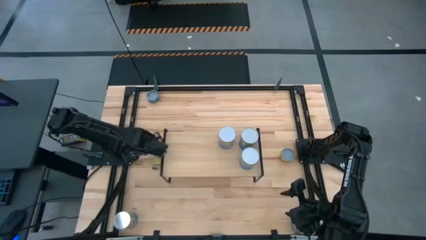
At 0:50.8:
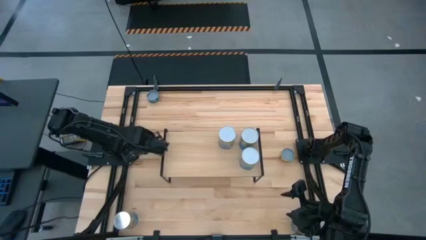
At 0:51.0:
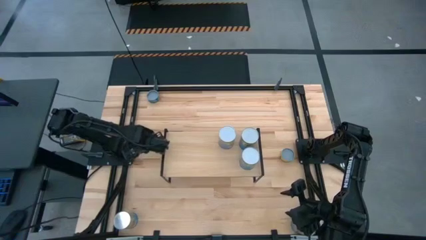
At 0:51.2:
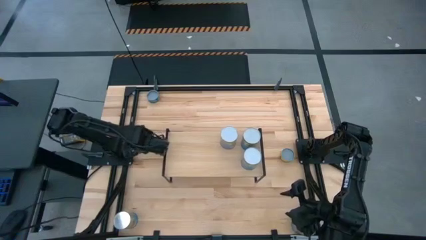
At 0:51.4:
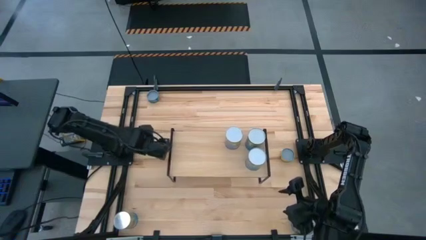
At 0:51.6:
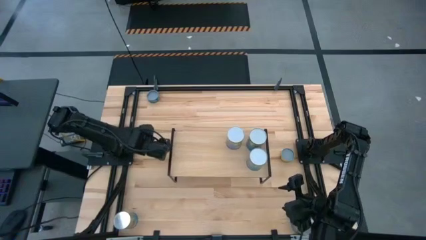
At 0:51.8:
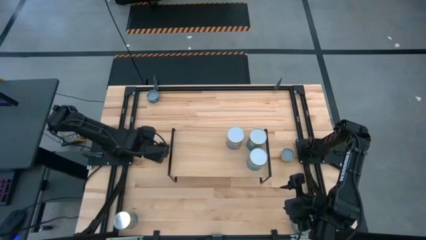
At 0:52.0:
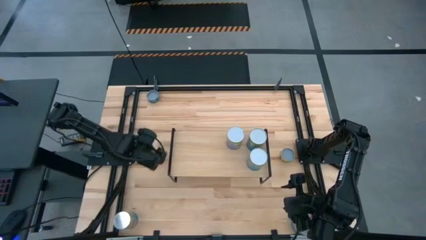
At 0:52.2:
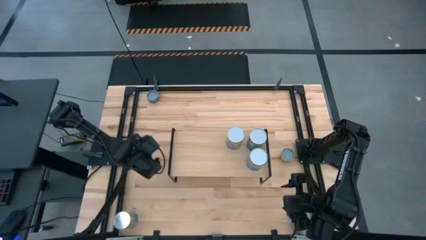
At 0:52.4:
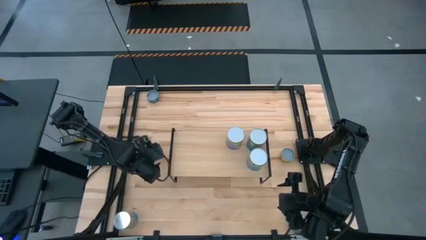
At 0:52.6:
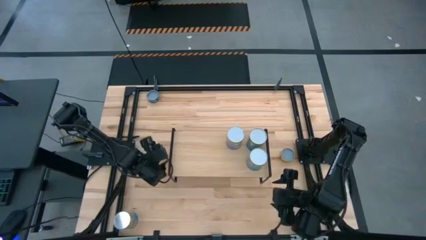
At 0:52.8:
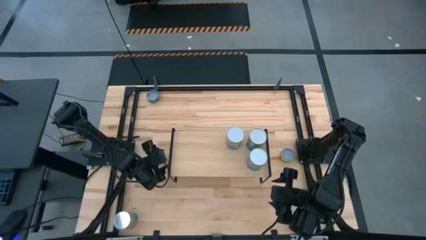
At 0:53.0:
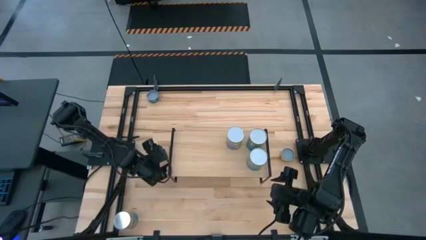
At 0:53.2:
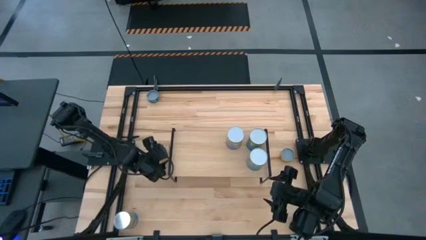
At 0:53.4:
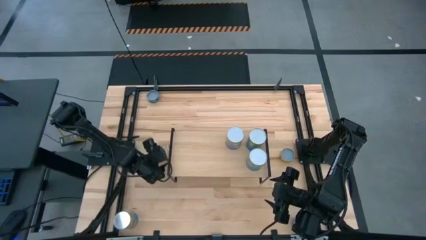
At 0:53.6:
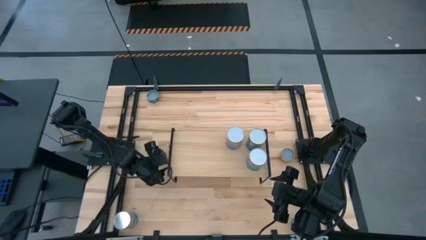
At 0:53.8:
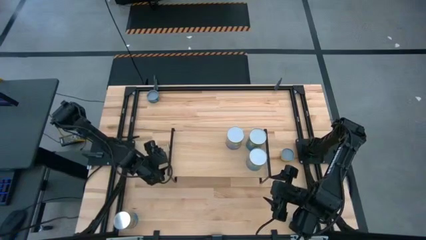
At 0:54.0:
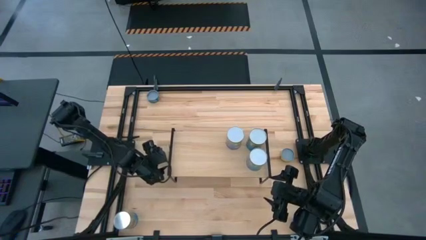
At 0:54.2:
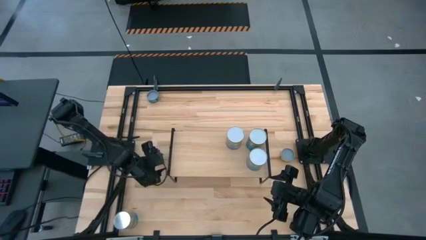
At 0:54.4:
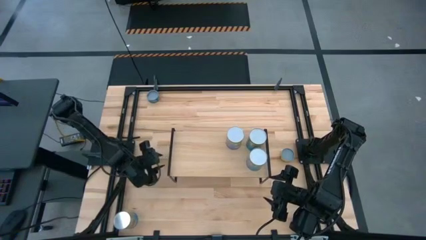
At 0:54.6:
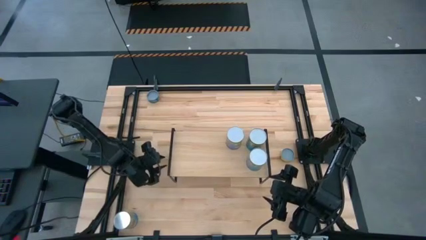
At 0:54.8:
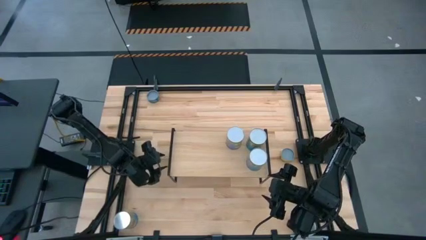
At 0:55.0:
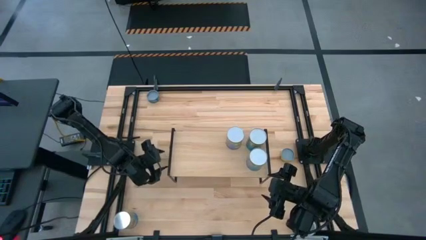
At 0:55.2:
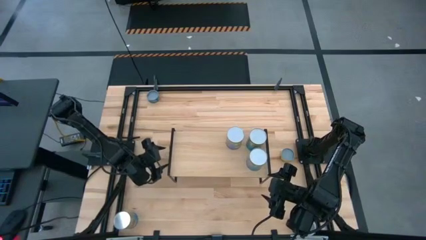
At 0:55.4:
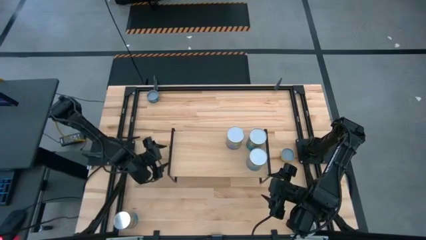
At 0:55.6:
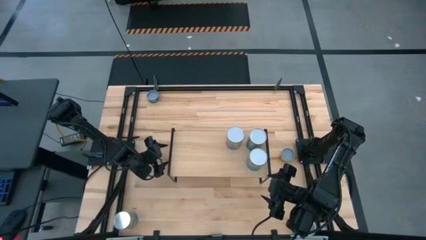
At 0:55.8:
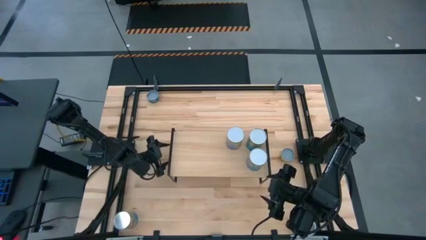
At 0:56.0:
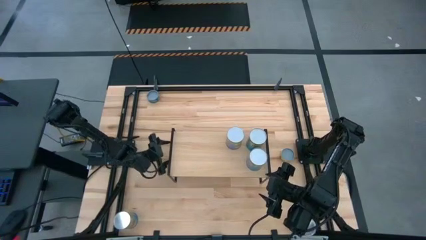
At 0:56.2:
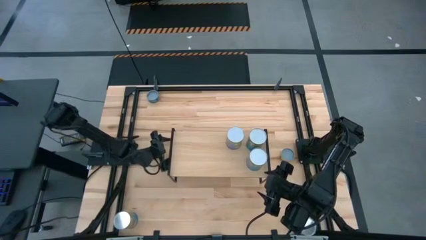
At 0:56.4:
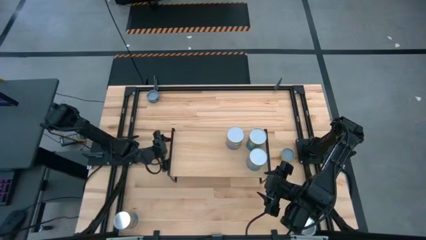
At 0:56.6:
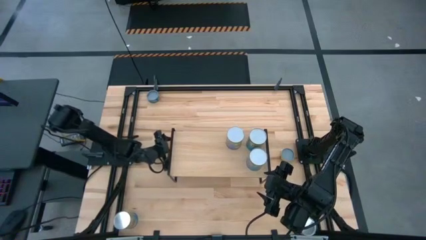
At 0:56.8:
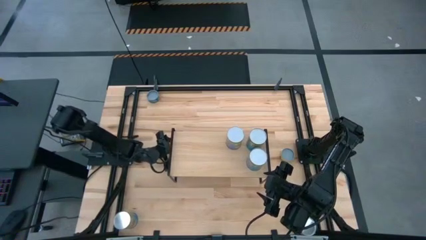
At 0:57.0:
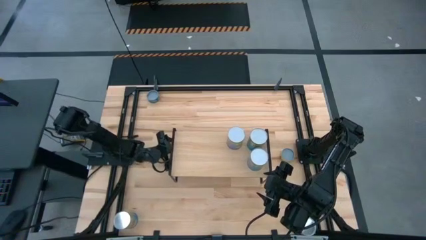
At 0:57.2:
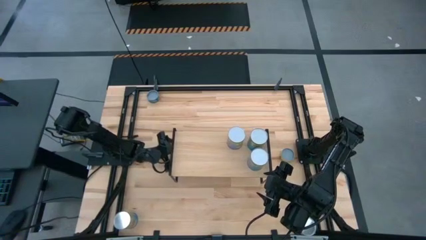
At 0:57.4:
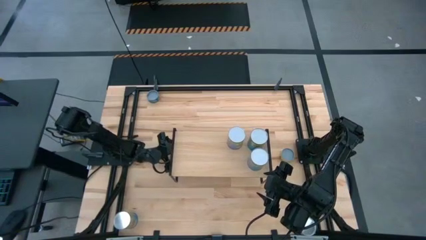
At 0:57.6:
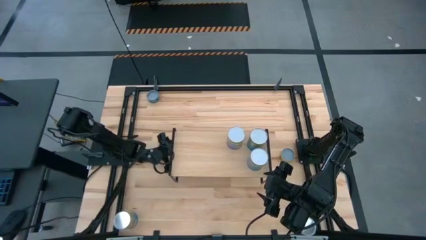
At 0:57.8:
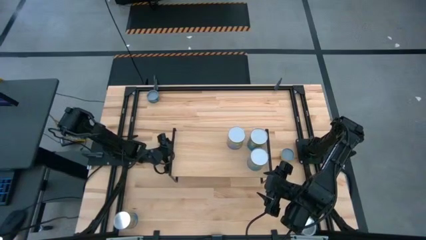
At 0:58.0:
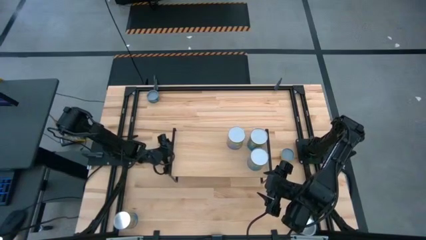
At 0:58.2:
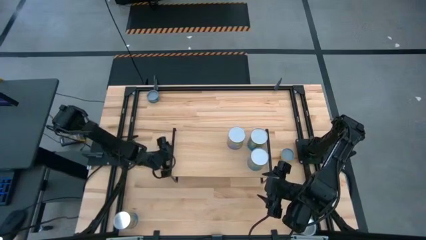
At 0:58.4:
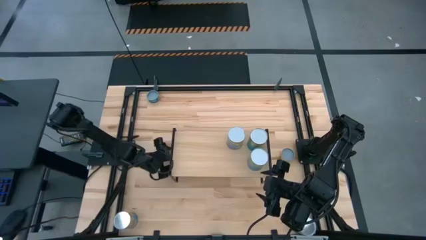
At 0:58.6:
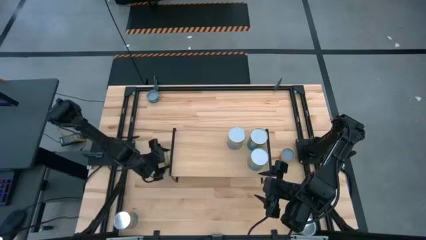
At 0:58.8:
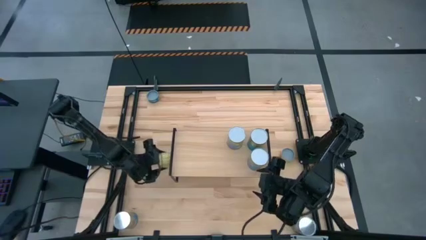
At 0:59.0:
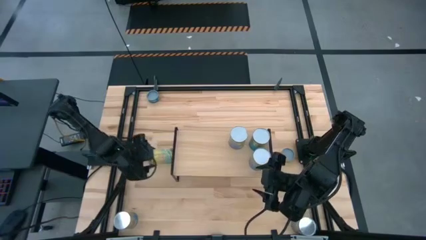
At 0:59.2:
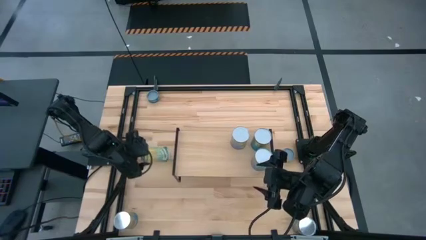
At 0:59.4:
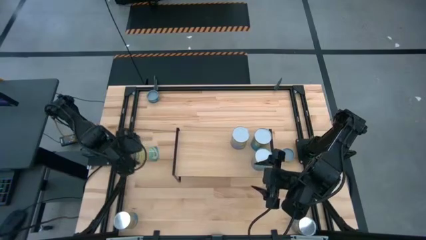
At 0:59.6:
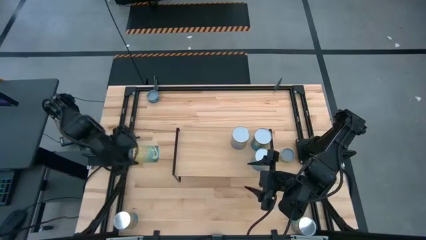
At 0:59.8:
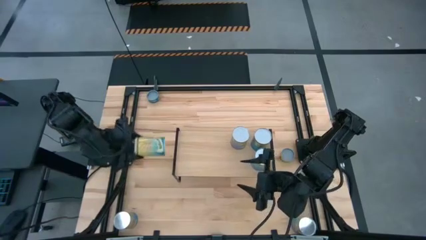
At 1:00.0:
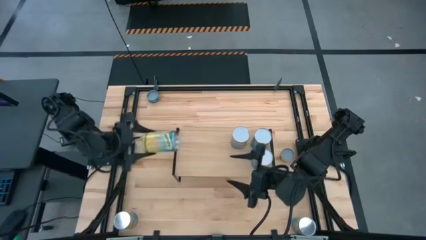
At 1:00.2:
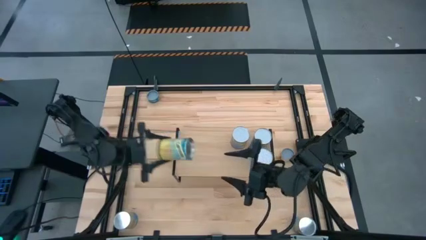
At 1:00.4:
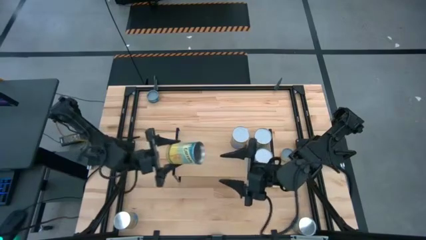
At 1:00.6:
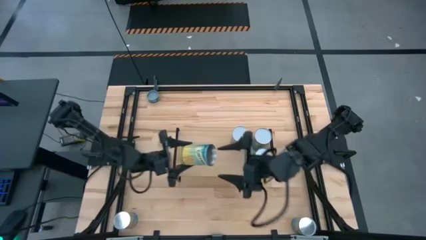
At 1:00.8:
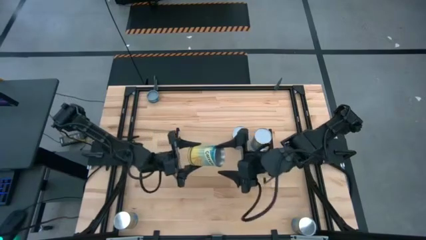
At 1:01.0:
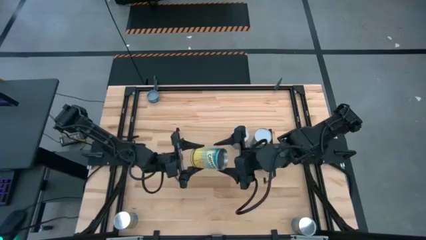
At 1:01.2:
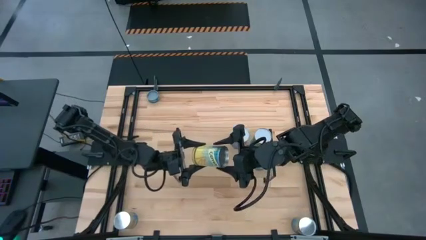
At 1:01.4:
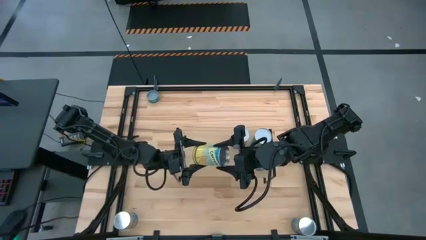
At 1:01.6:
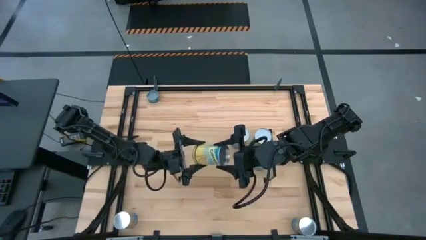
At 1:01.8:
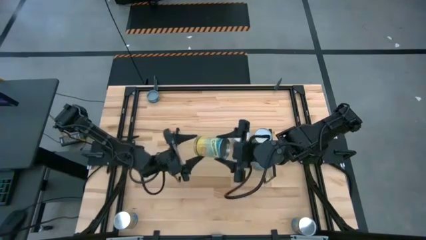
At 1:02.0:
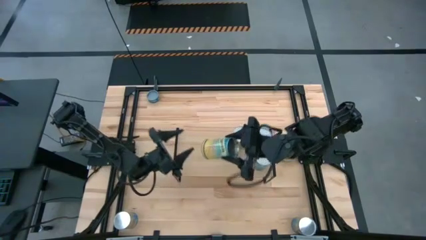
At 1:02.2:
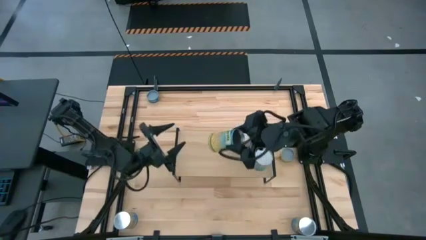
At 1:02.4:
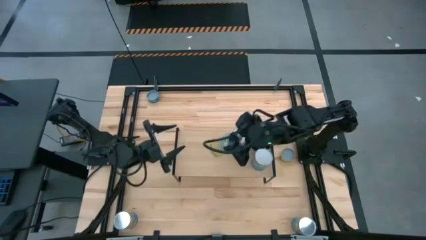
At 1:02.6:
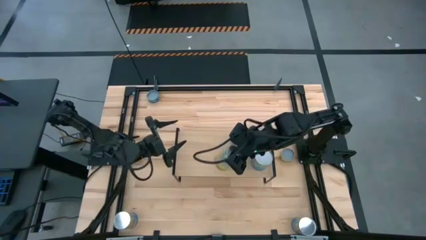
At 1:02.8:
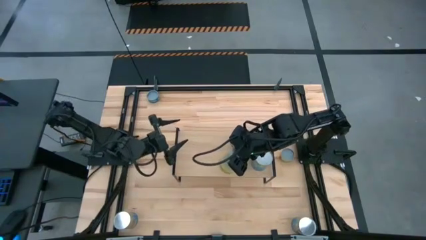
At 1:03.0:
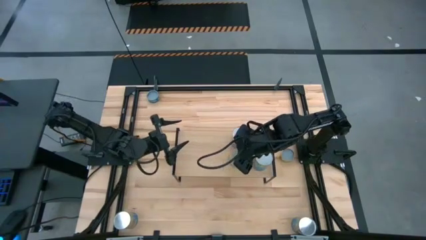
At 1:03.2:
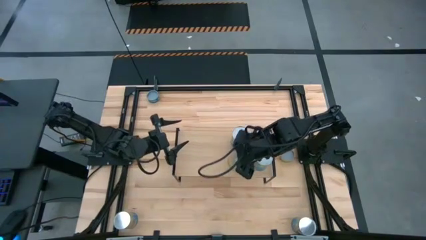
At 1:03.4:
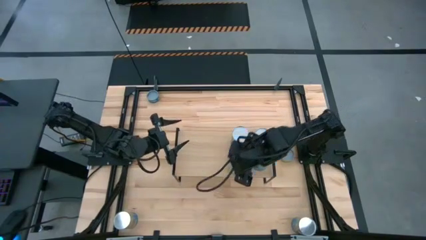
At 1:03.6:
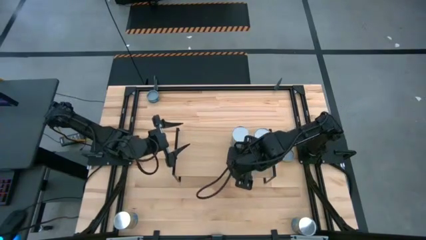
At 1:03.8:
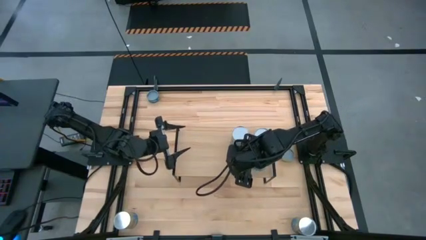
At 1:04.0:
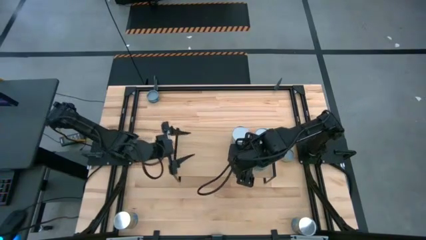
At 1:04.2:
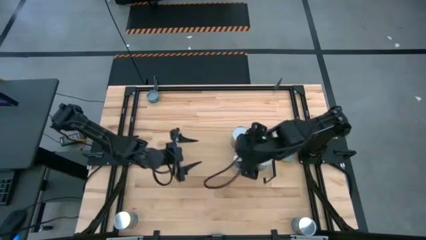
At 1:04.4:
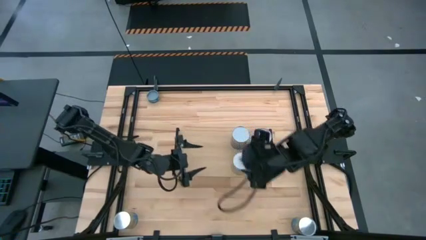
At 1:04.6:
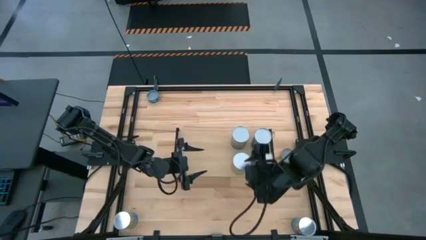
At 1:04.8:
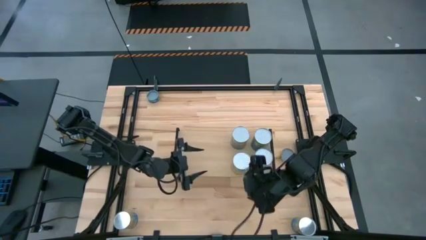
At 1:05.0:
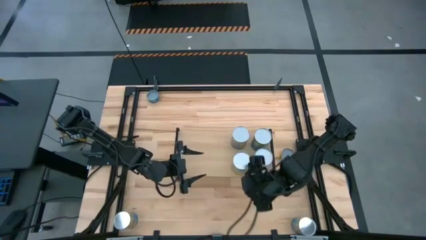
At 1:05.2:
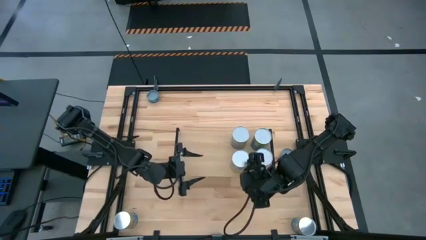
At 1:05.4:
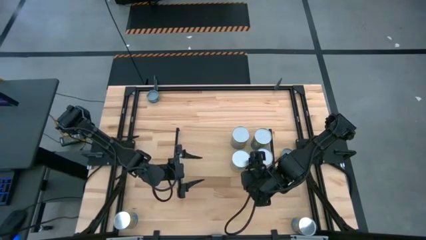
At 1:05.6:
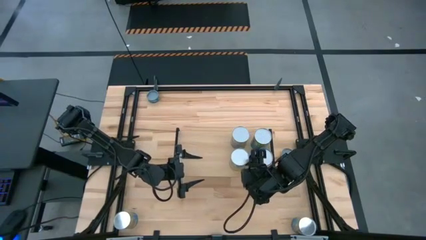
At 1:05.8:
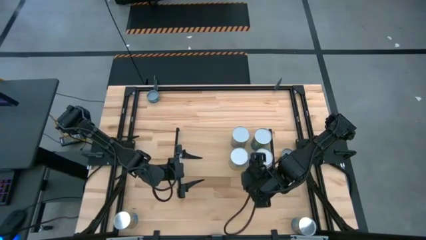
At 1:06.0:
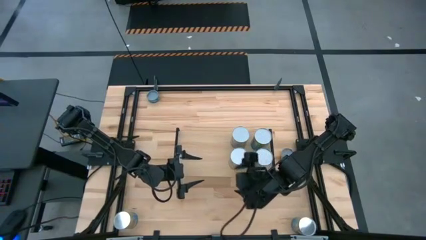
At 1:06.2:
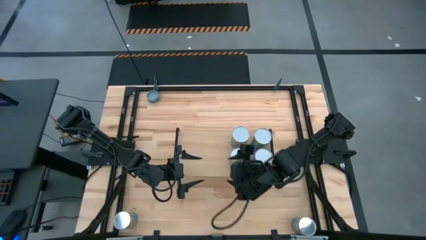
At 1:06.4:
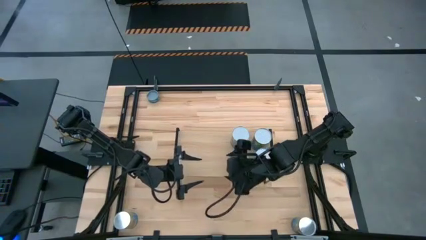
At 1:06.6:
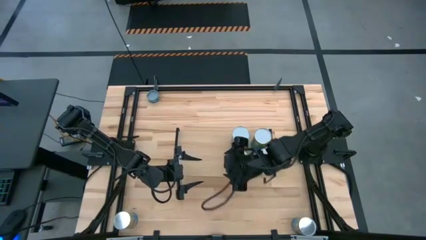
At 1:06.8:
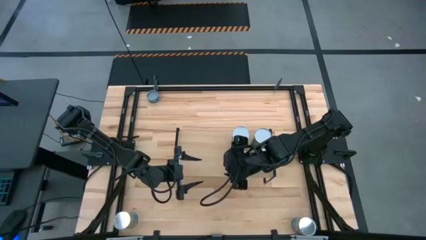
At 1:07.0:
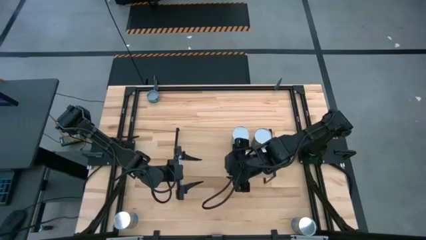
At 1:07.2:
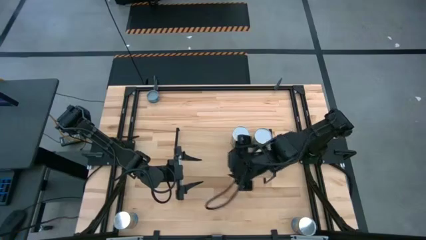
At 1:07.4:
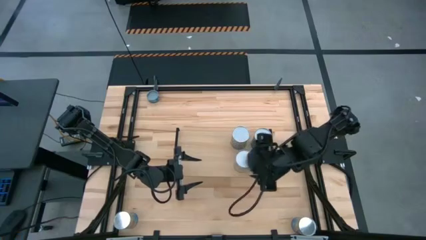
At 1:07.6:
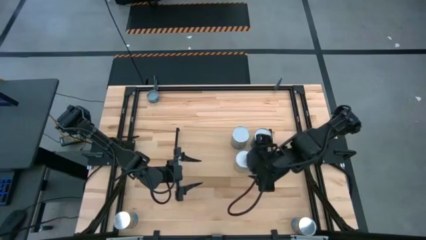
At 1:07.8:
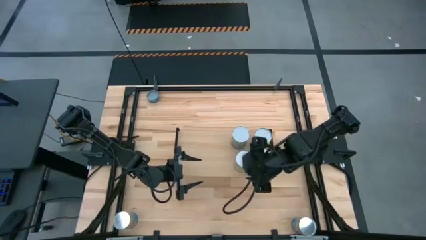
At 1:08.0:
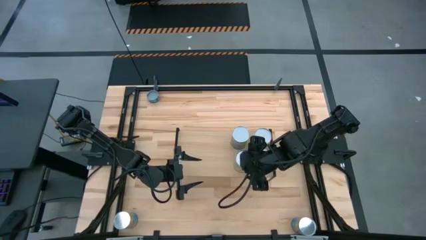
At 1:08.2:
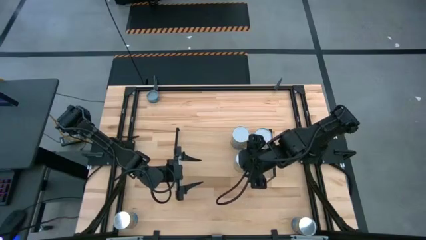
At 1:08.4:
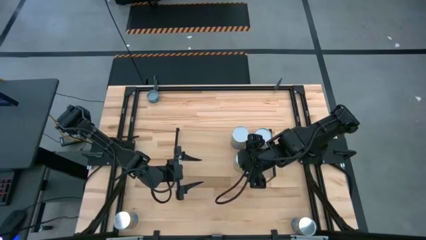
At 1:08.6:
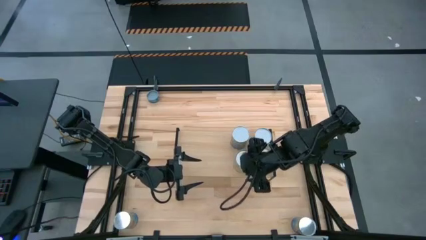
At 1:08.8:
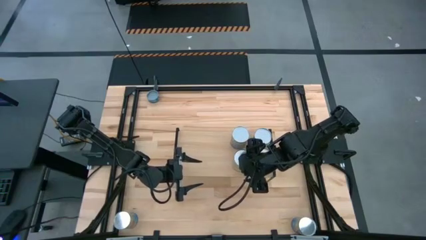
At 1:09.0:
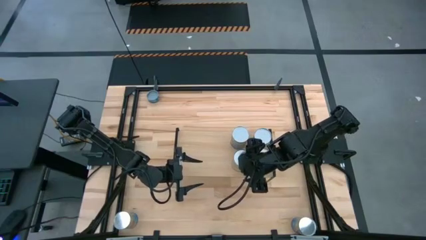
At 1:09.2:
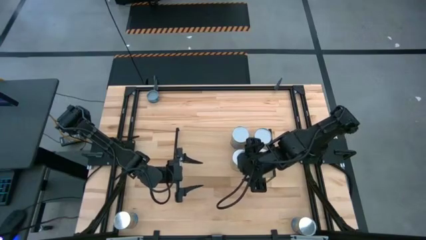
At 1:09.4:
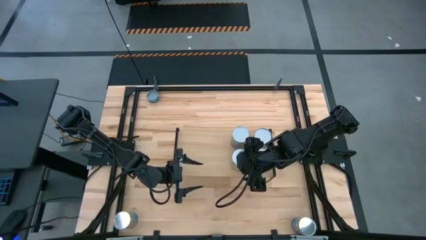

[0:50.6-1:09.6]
Task: Pick and place cans onto a shelf
Put the canned carrots on the shelf
